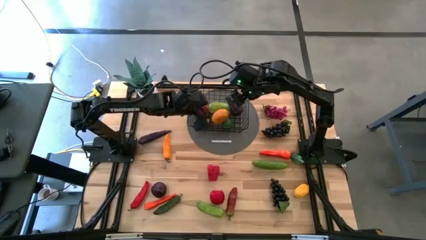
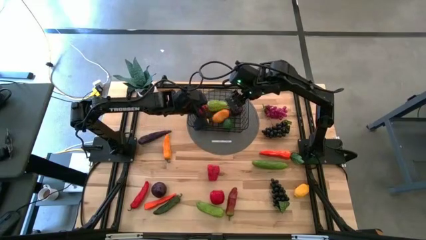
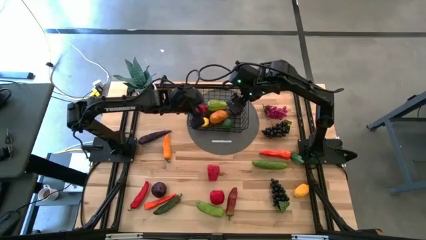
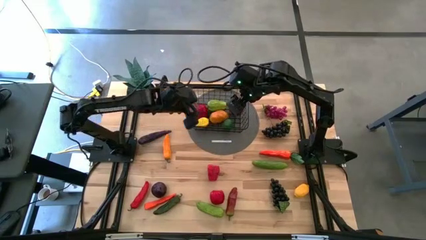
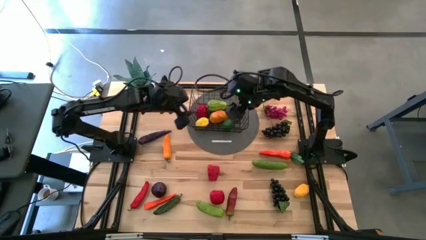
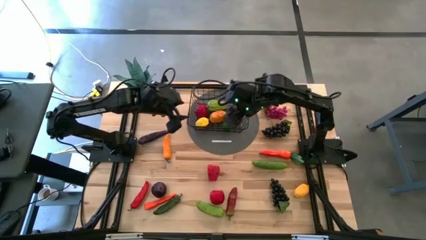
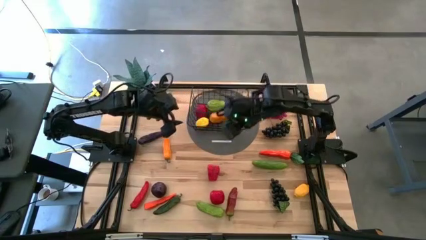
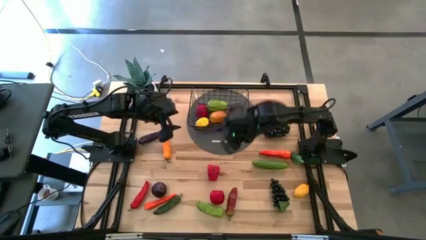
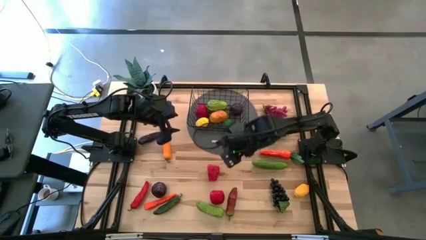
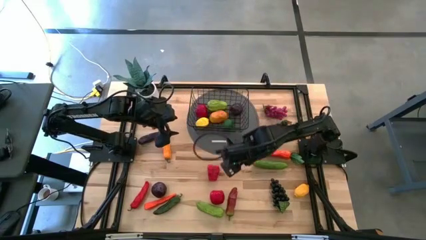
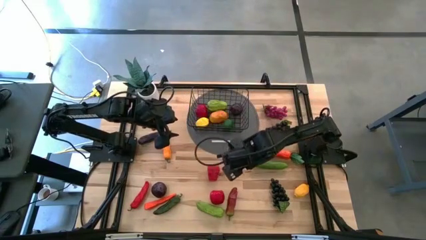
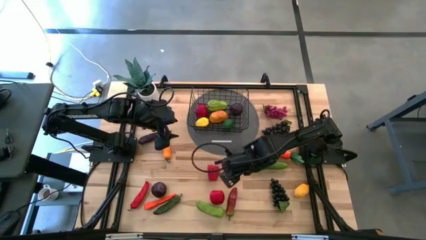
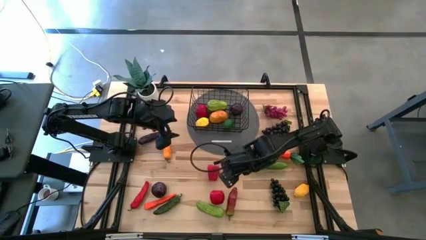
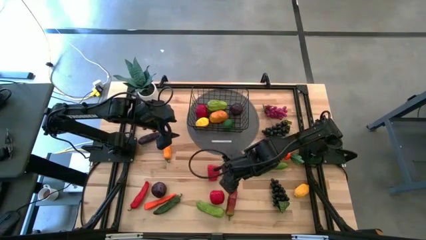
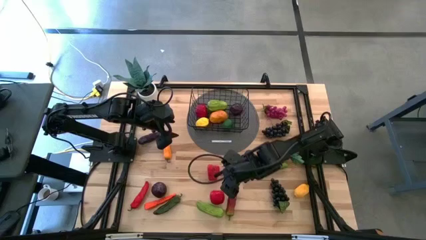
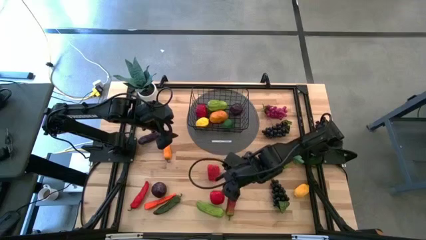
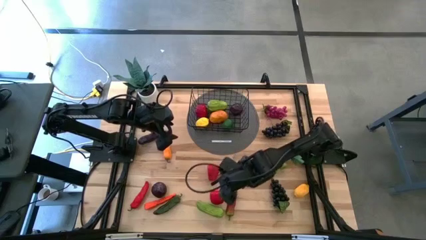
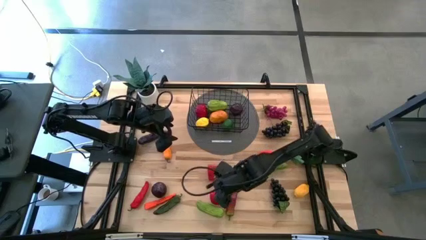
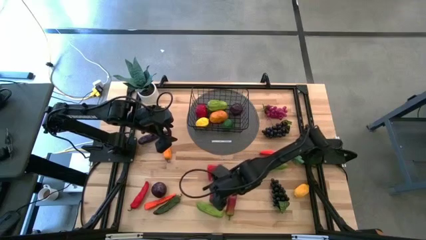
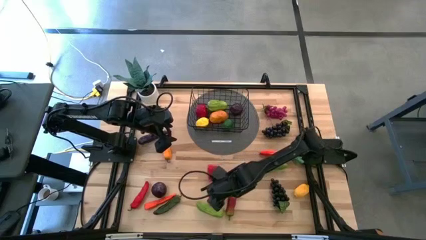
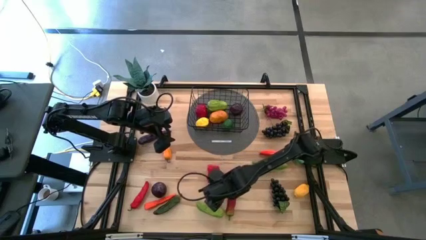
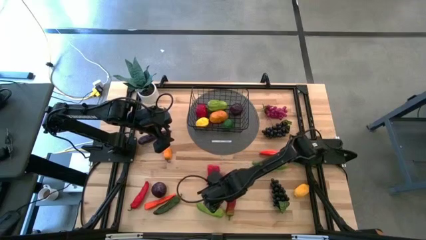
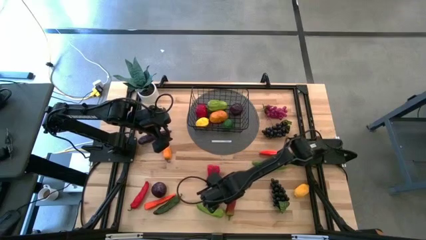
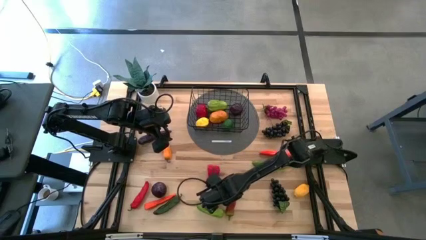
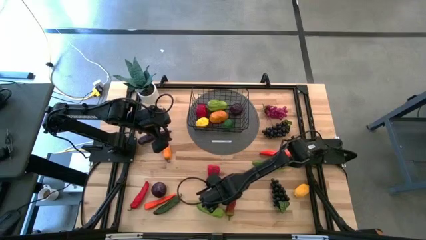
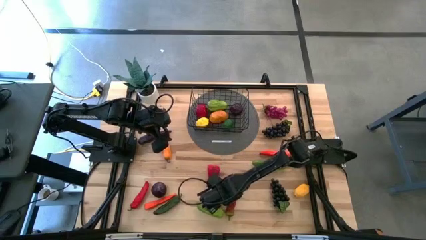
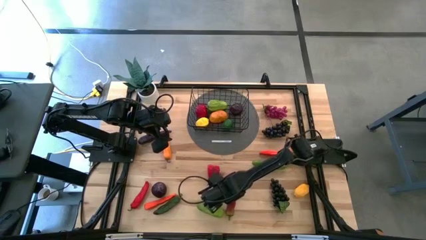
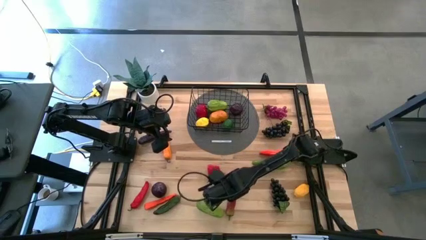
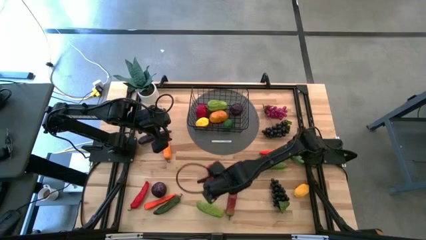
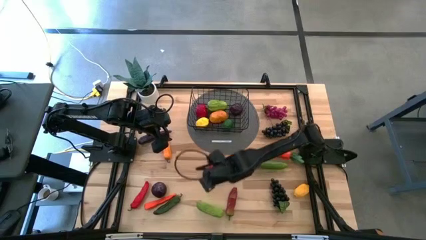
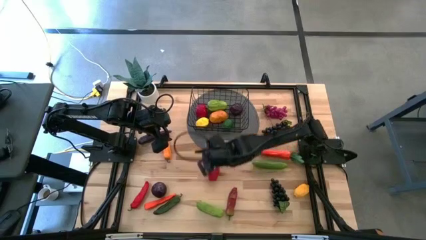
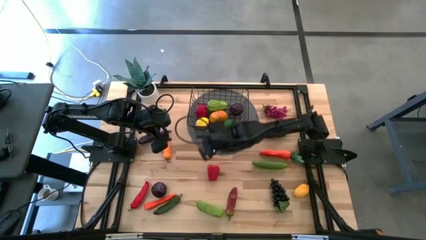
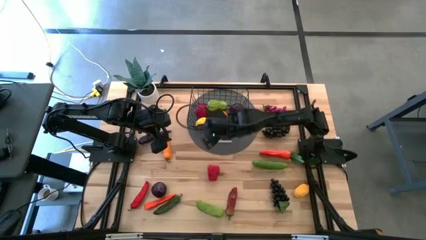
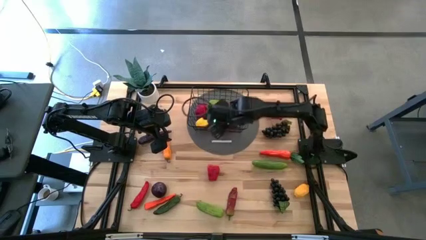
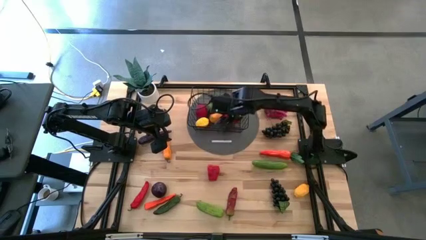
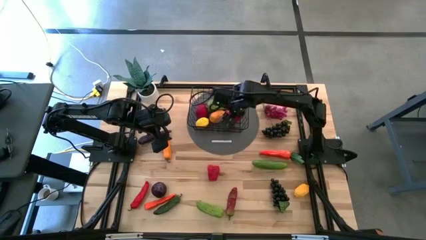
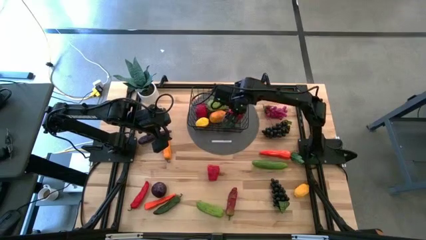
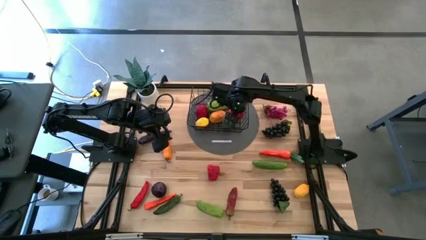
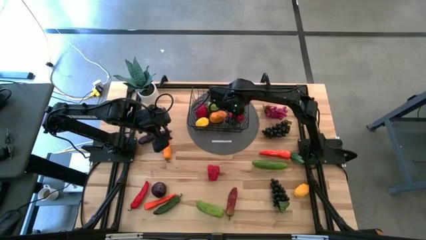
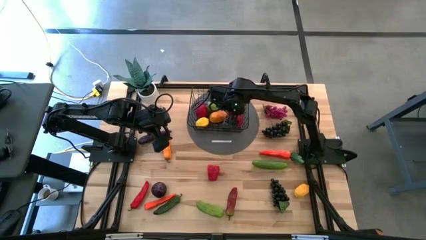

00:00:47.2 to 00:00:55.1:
Task: Build produce basket
Put the apple into the wire basket

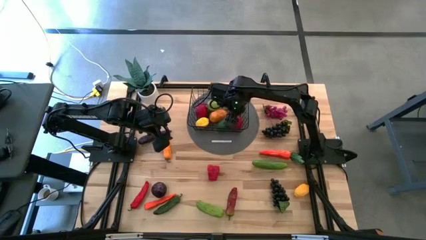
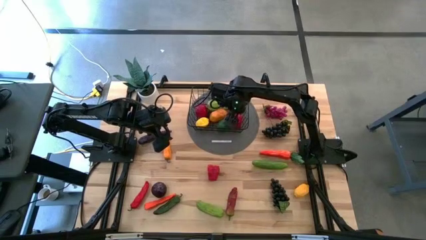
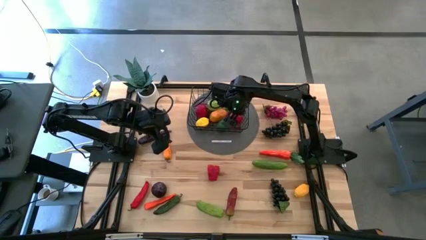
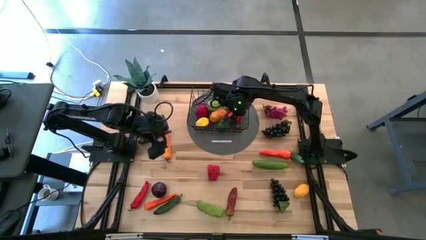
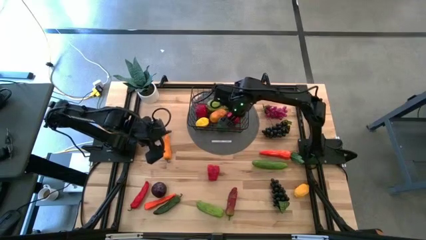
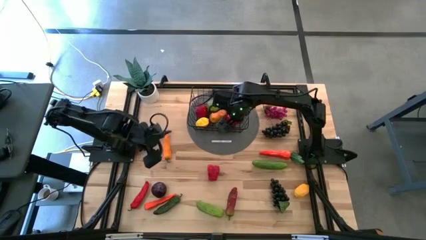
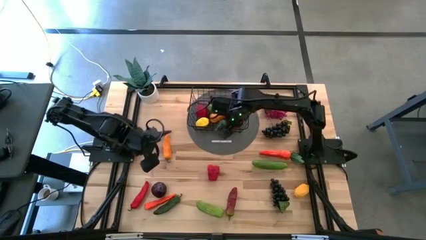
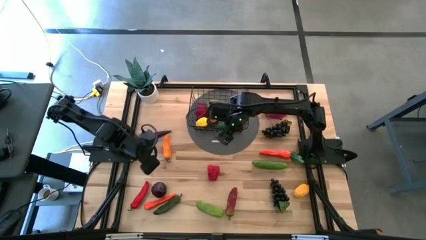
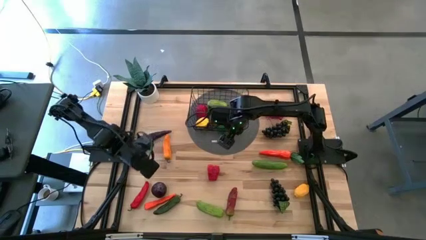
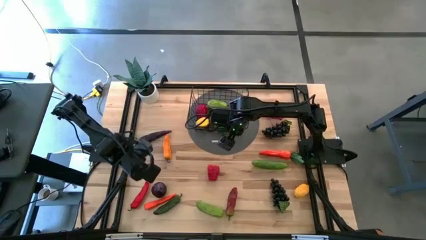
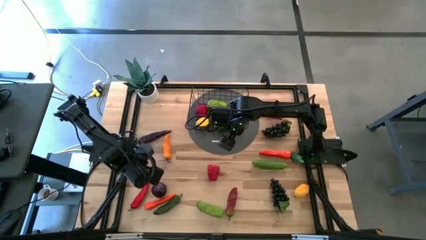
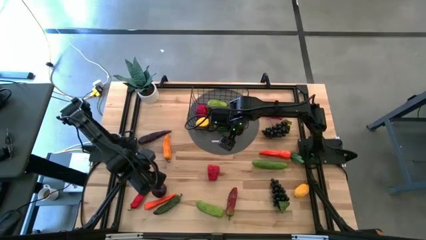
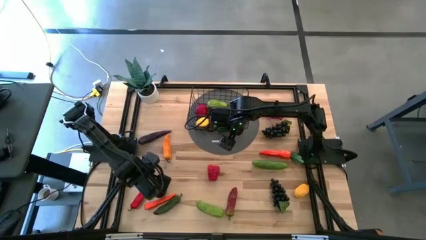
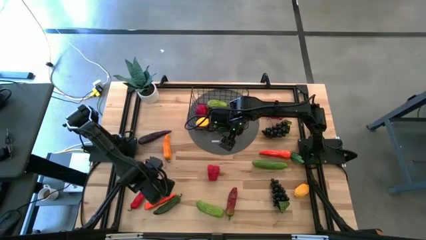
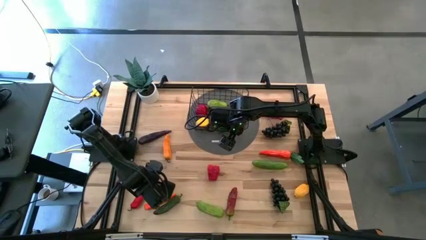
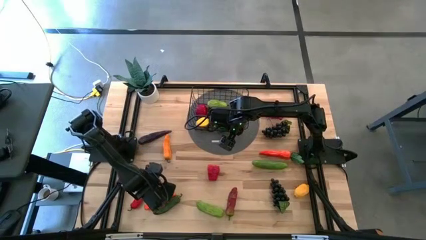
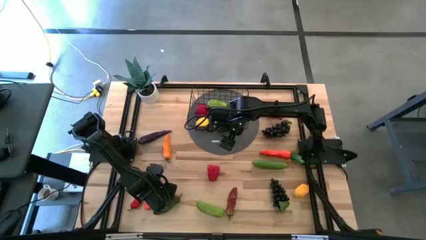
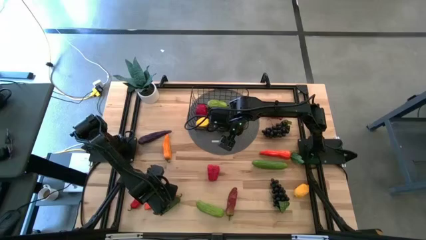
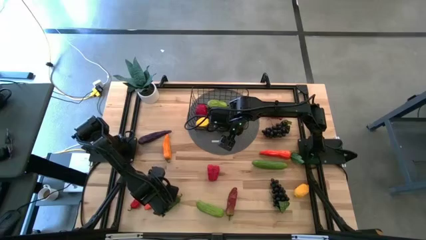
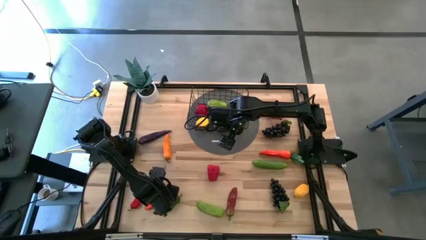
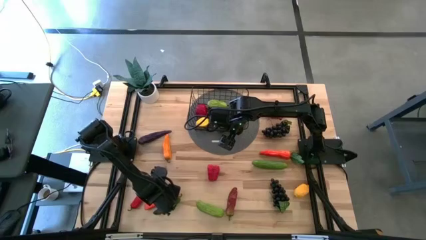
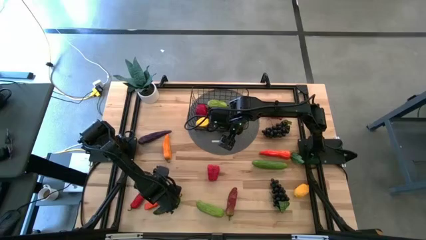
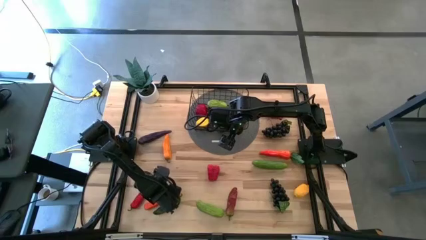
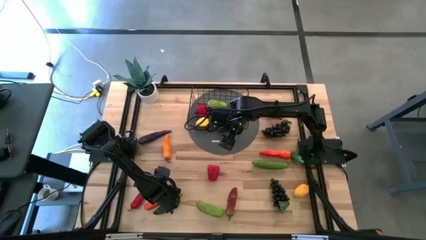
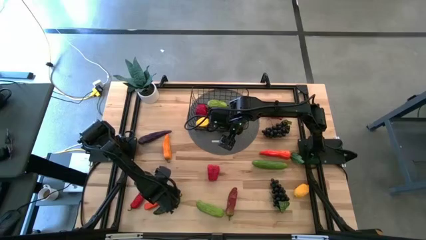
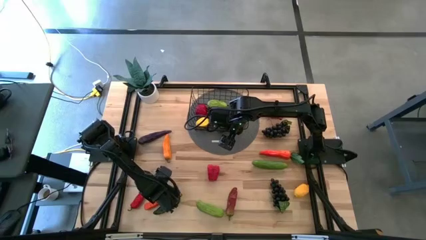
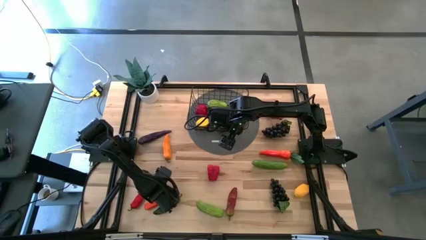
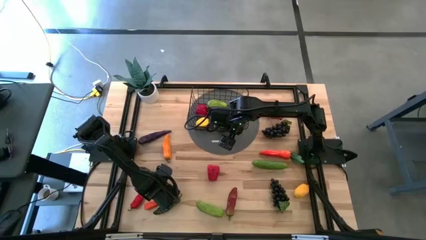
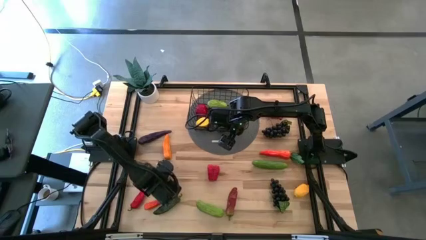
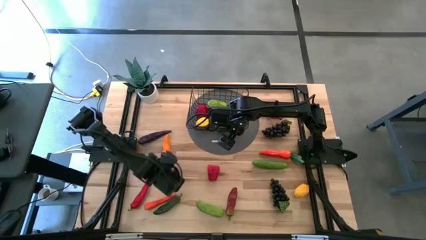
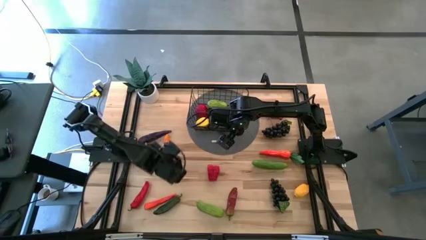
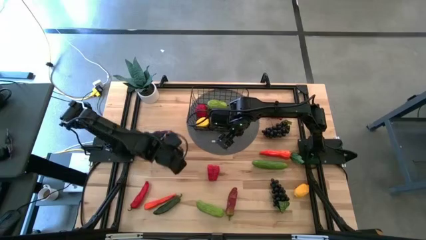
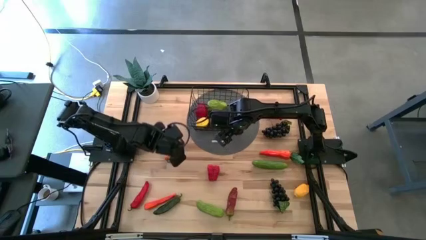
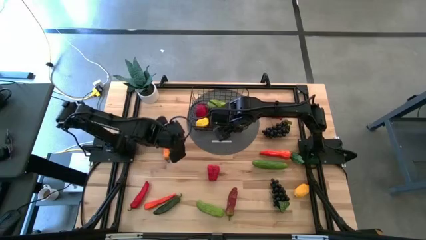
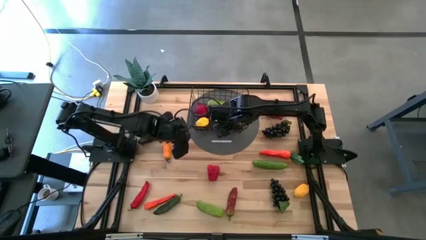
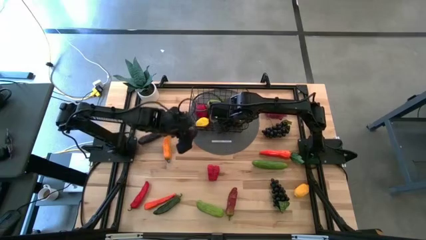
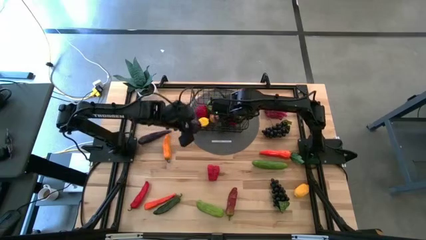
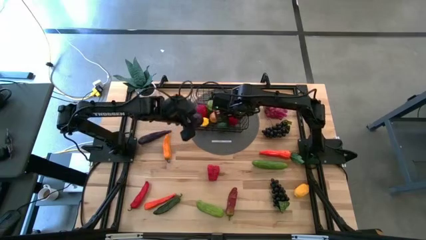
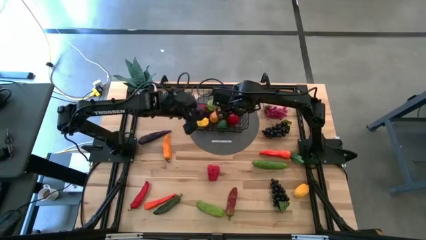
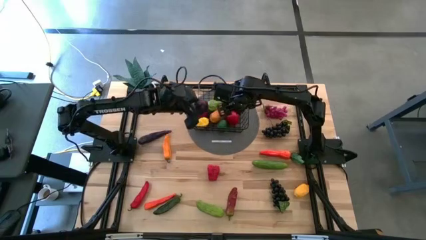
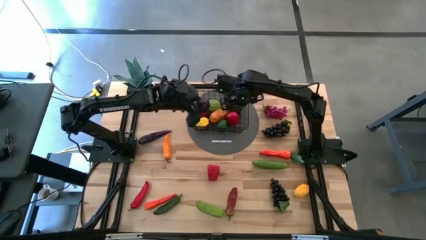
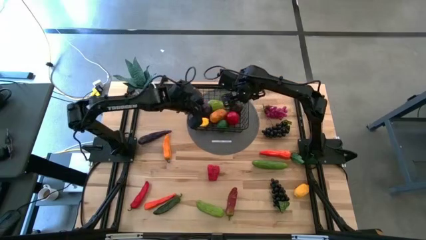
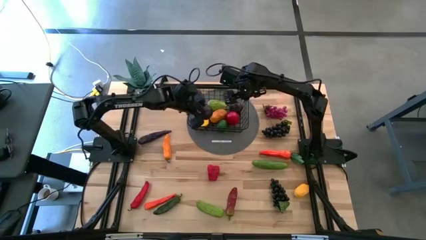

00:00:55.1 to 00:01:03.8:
Put the onion into the wire basket
